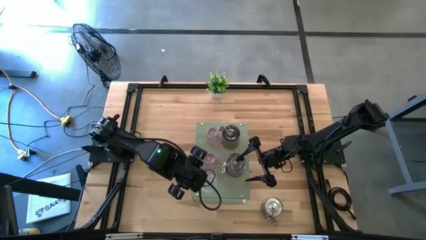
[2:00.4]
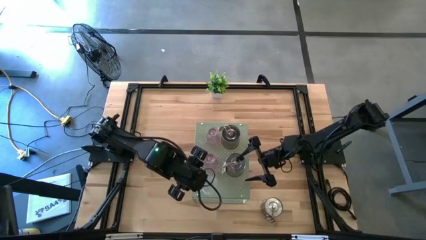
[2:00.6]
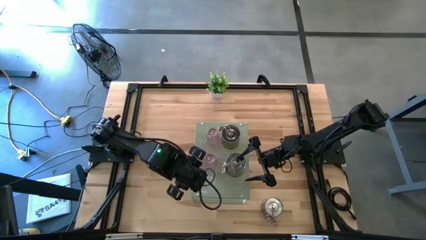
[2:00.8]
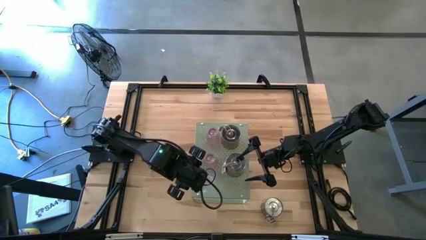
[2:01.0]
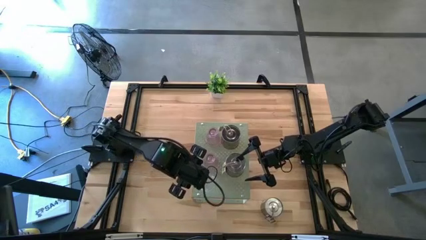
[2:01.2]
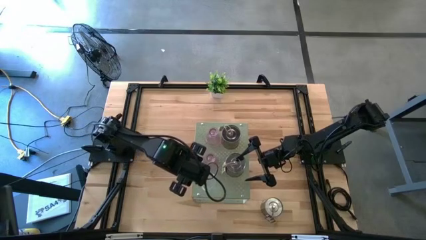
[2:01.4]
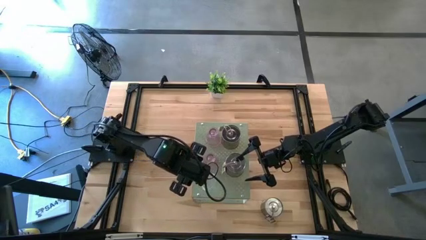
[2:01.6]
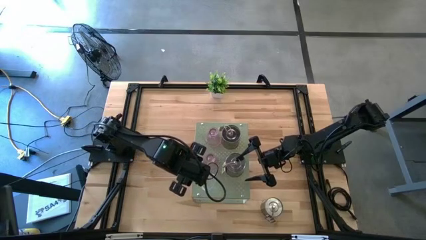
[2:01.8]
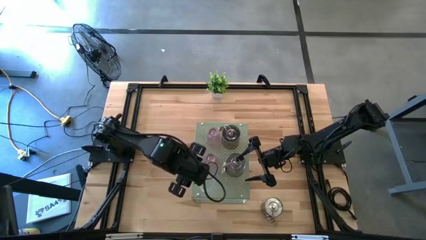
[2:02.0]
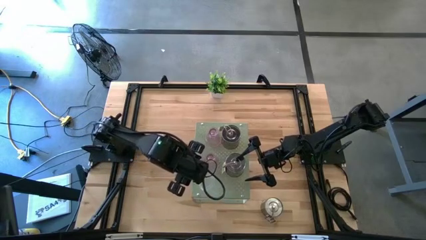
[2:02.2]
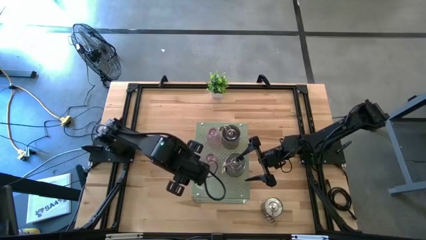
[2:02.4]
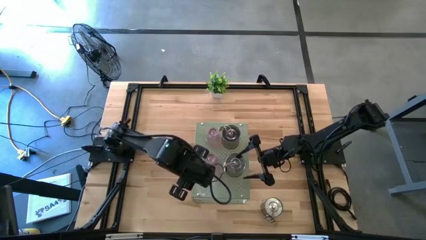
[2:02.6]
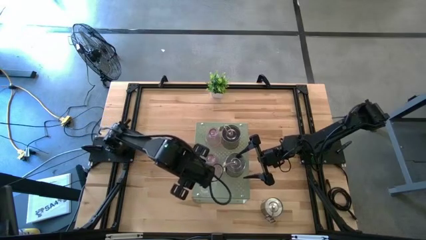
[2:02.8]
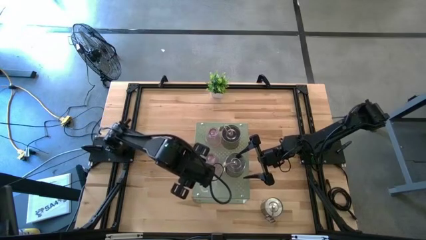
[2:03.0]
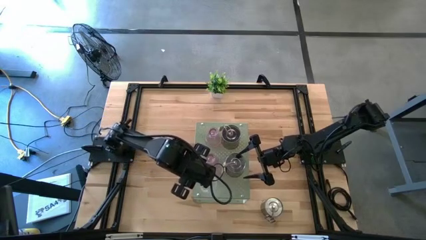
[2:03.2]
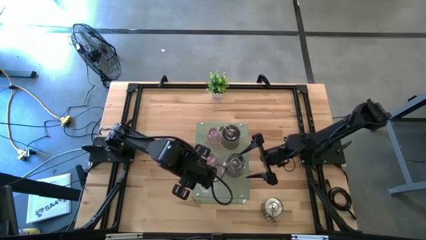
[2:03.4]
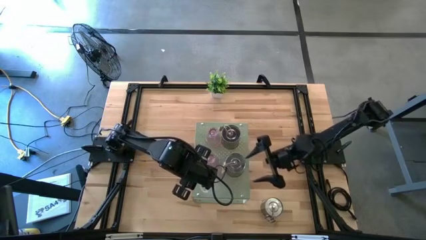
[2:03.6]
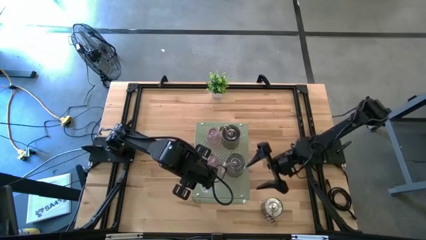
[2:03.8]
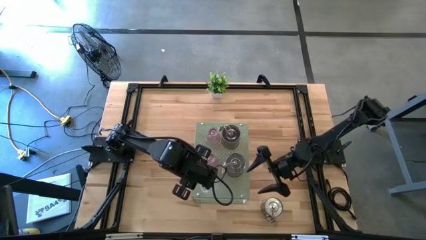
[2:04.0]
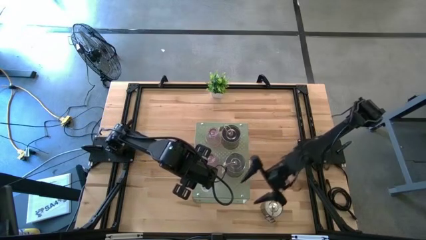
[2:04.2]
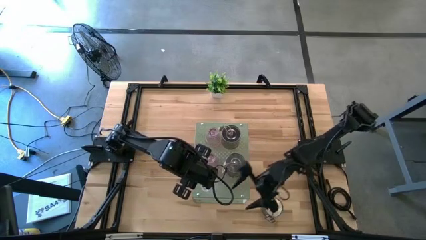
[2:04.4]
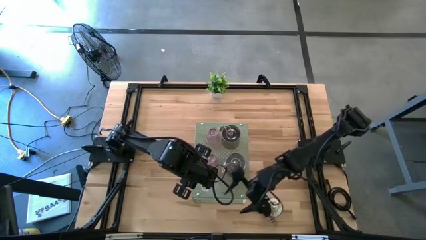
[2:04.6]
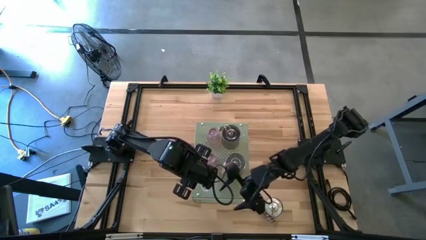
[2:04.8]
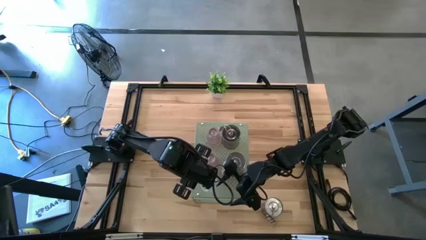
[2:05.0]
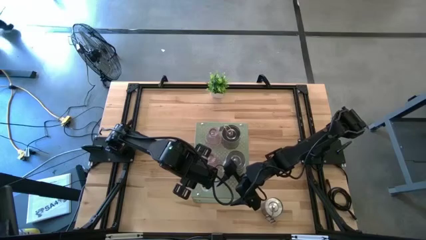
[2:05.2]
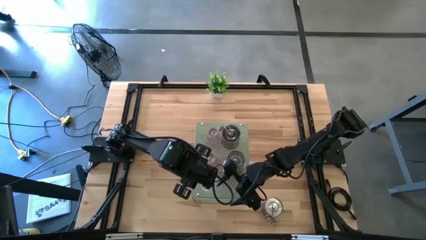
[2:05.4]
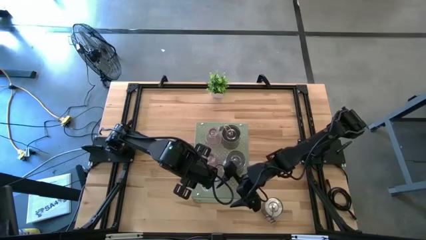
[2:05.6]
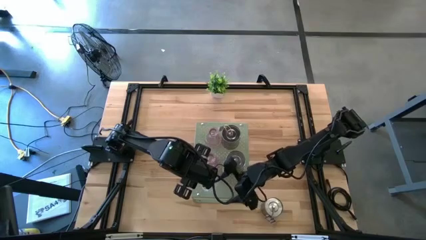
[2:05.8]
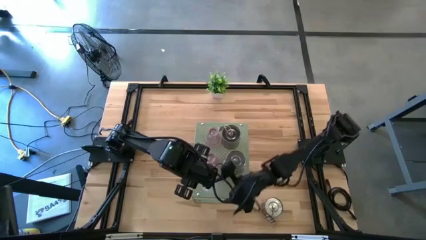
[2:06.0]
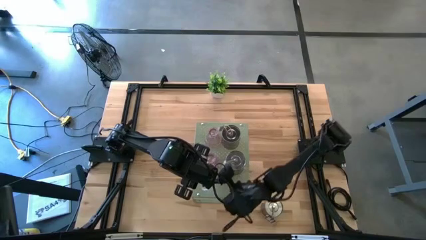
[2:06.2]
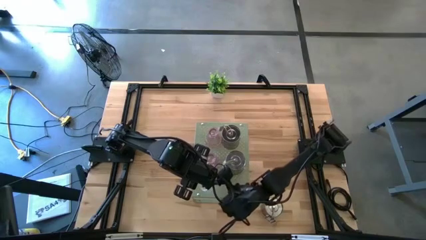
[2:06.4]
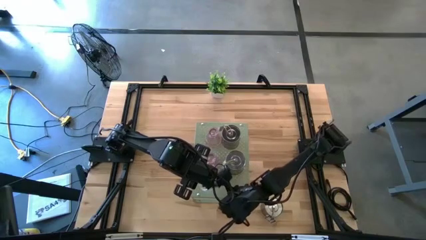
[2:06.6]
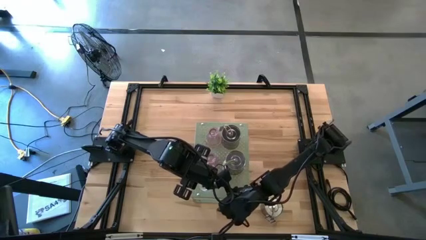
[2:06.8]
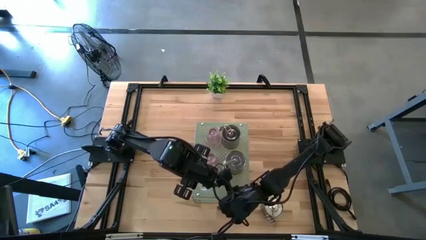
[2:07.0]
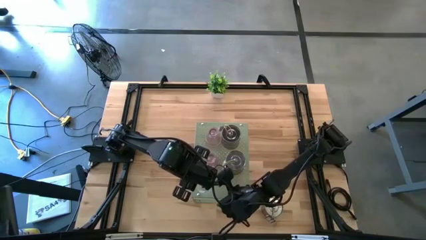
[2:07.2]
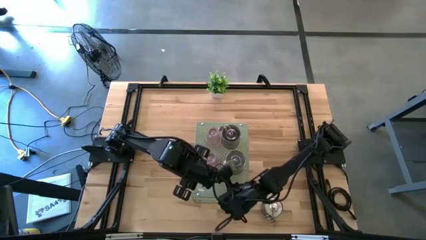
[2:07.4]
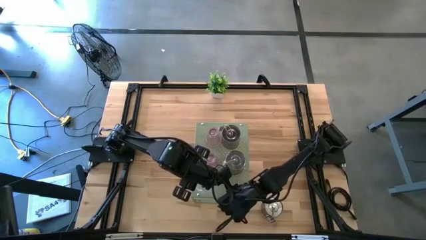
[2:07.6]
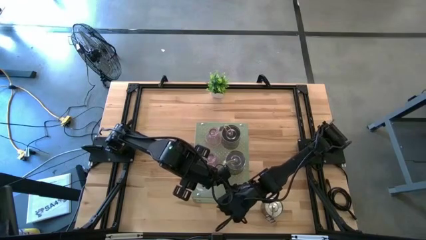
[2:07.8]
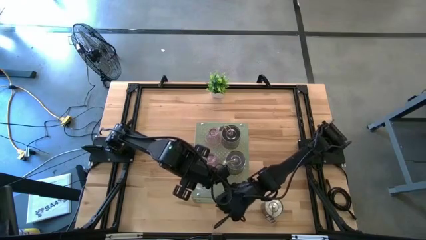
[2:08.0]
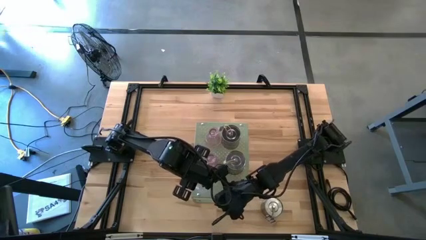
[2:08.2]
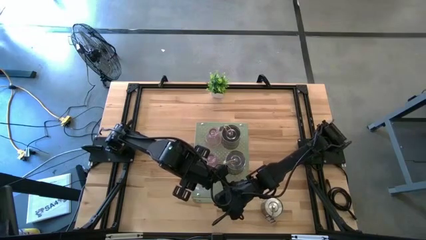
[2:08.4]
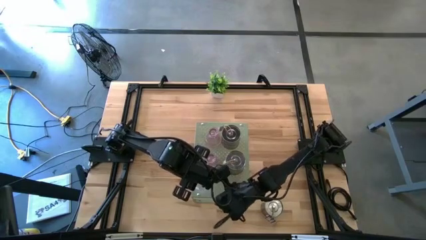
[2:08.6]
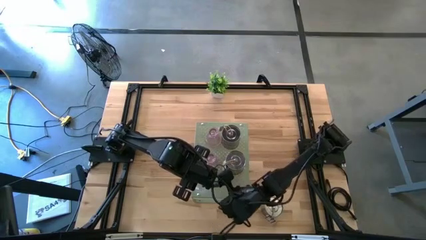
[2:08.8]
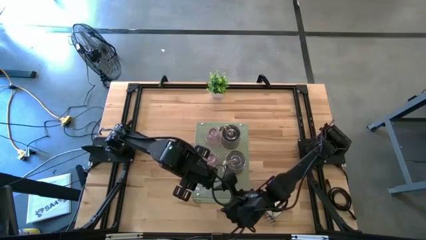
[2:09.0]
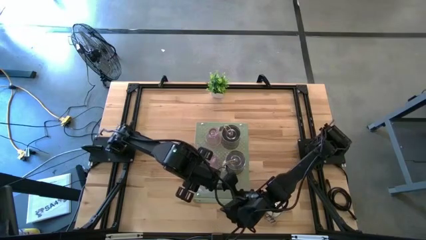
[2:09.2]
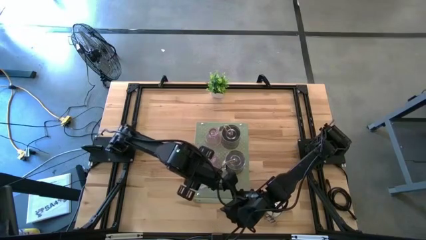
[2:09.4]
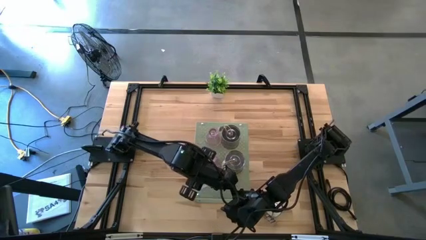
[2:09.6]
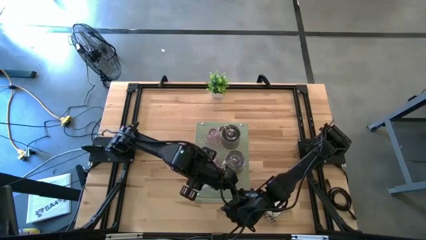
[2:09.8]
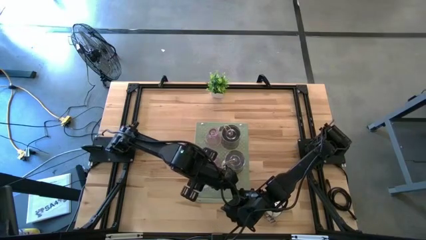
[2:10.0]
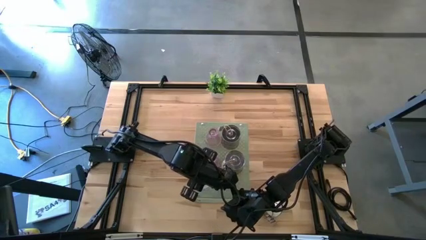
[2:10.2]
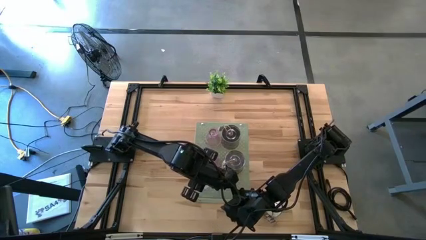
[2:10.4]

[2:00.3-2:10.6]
Task: Pick & Place candle stick holders
Put the transparent candle holder on the shelf

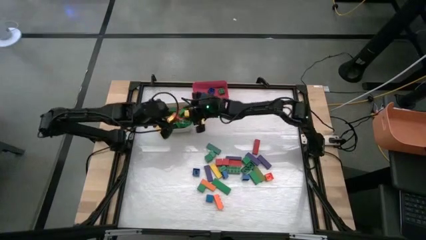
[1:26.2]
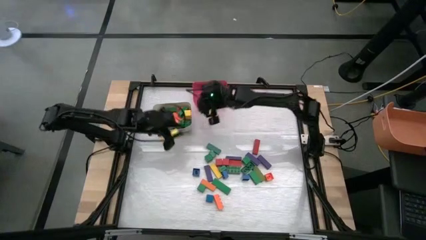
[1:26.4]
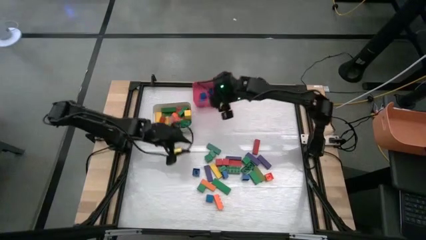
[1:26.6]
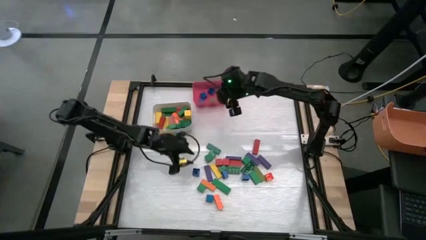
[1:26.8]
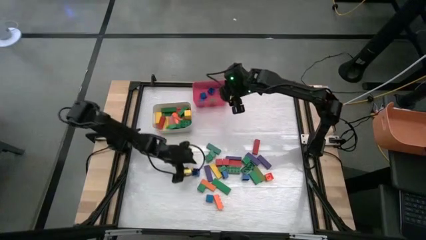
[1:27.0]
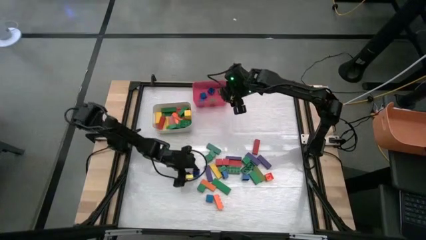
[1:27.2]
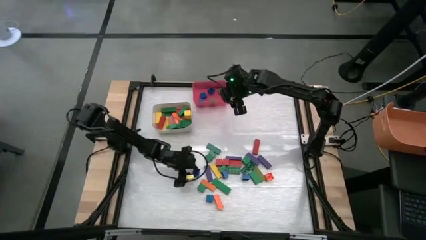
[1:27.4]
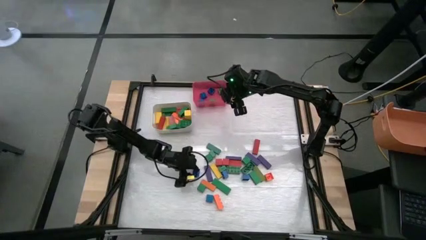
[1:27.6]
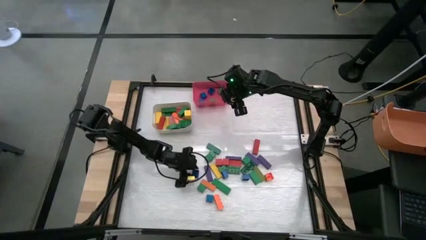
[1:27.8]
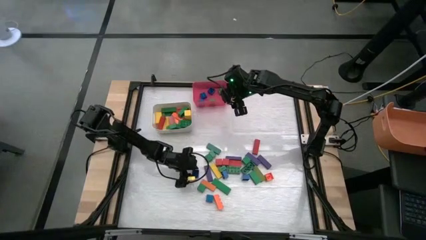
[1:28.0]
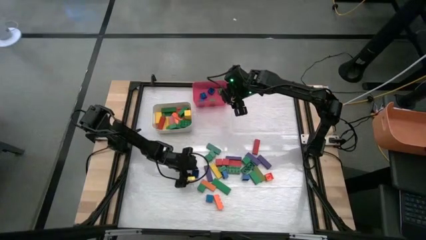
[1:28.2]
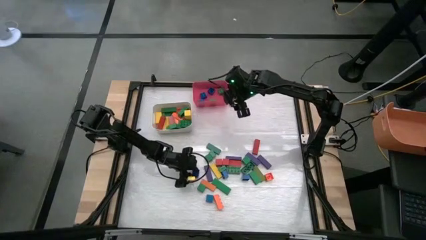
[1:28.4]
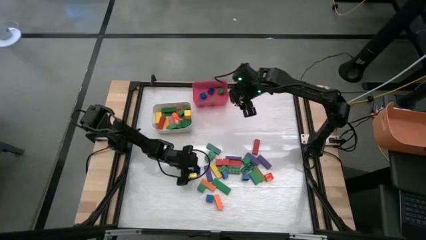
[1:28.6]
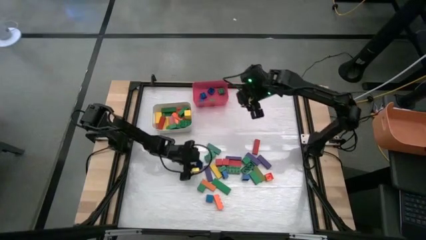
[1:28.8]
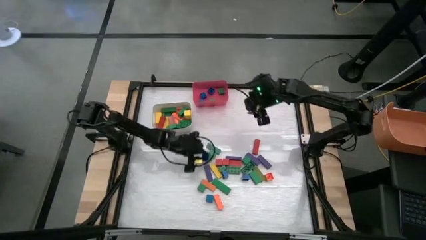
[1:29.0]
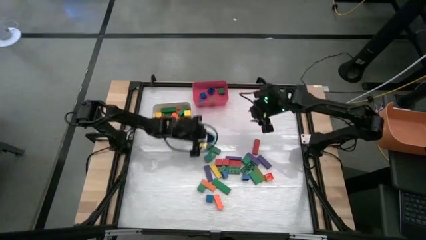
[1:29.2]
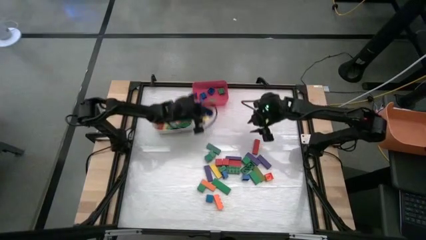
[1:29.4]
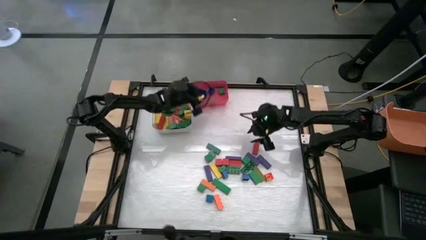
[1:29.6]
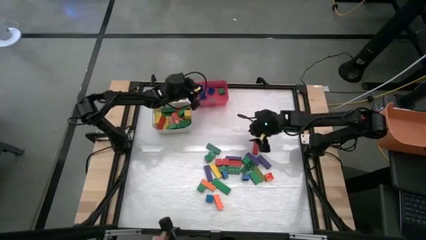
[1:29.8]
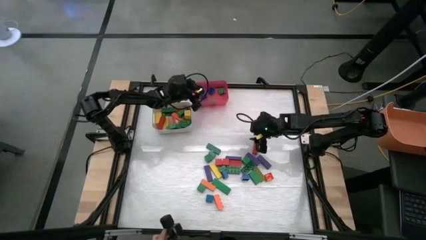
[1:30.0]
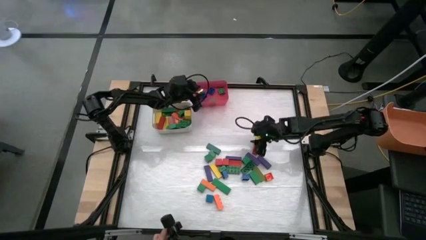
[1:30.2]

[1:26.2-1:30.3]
Task: Sort blocks by size
Put the small blue game piece into the red bin

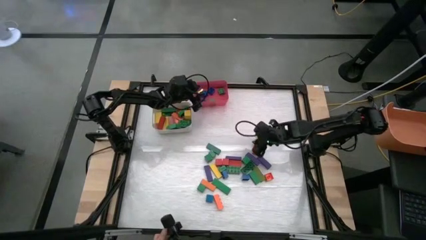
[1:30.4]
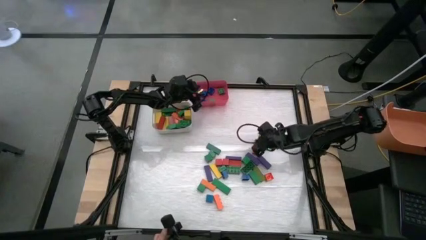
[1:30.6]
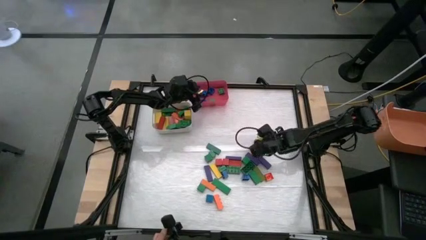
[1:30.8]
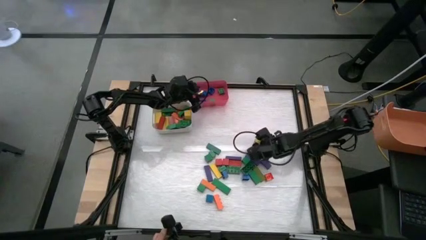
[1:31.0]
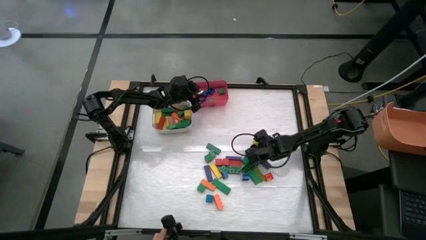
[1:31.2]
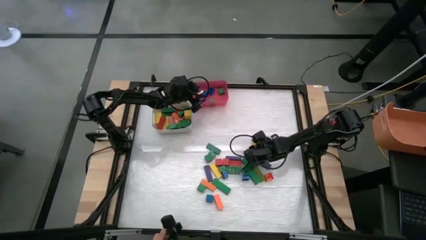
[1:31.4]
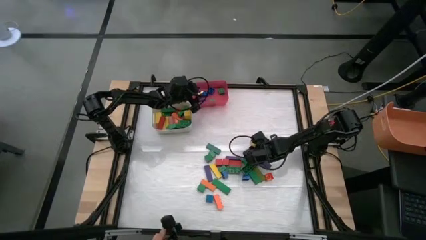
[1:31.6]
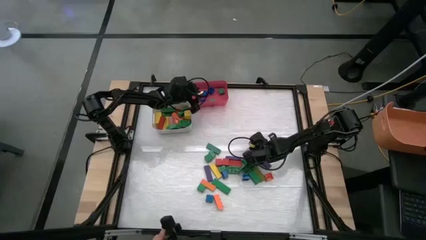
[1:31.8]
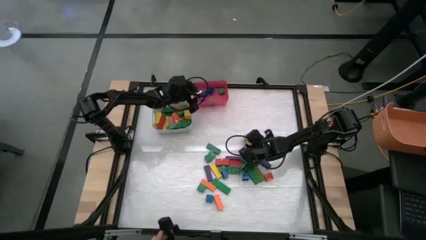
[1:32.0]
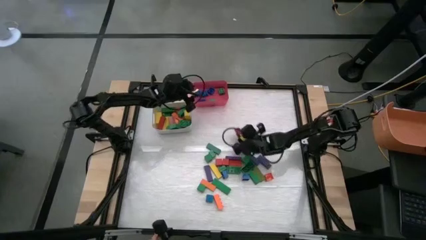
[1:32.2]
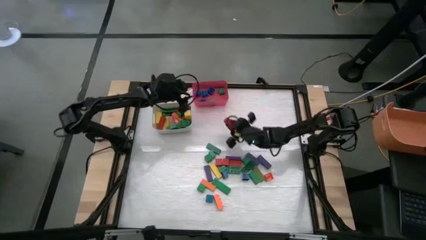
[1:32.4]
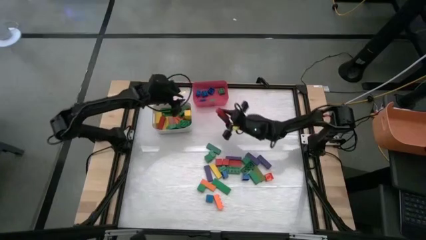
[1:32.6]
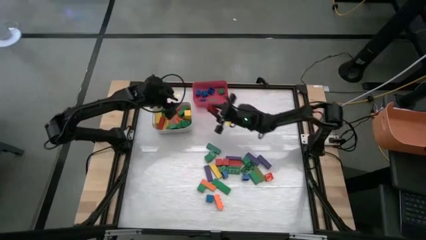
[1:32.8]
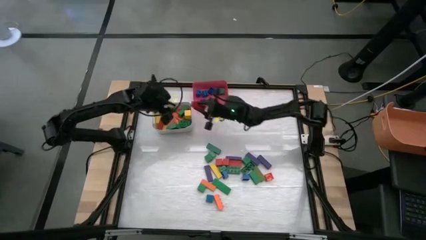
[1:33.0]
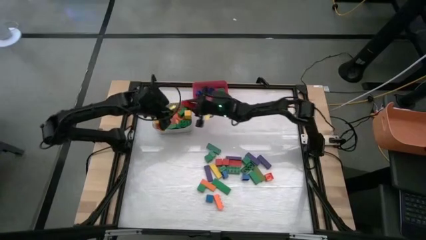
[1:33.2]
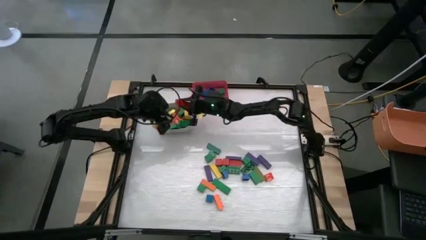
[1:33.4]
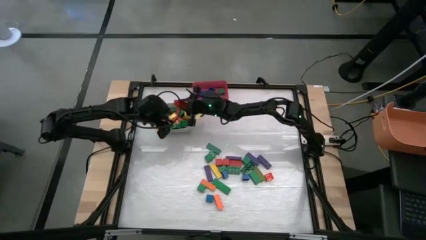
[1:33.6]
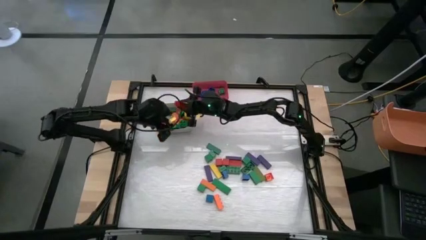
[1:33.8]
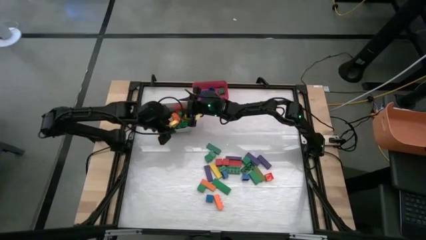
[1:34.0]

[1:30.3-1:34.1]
Put the large red wooden block into the white bin
